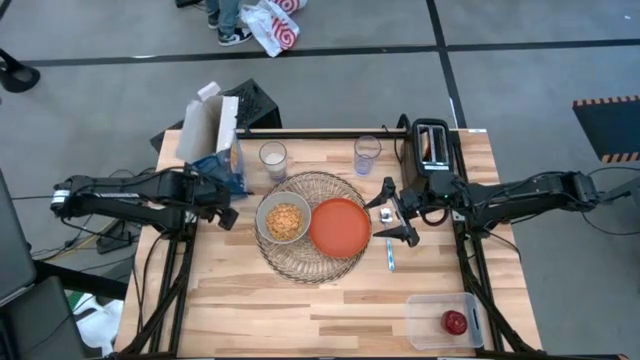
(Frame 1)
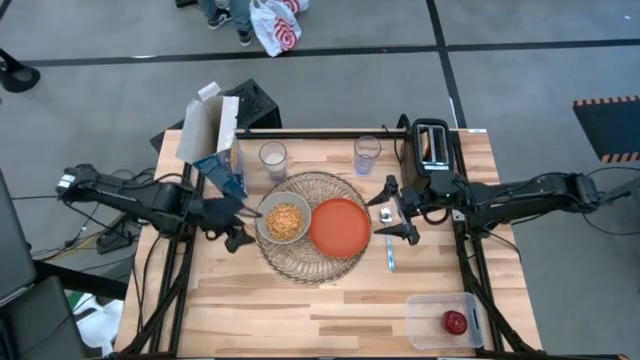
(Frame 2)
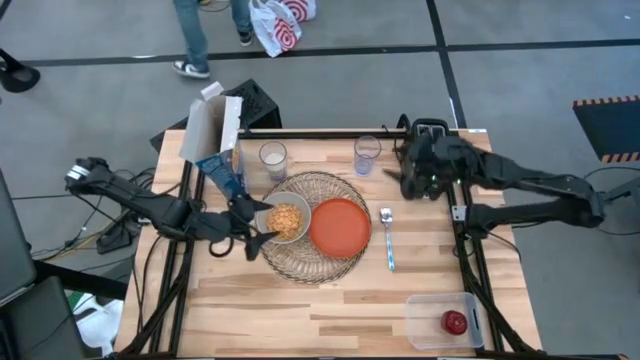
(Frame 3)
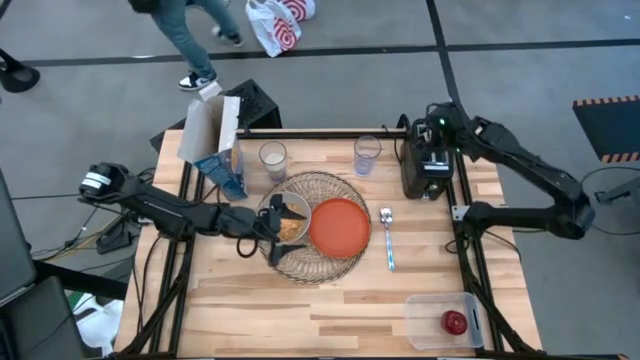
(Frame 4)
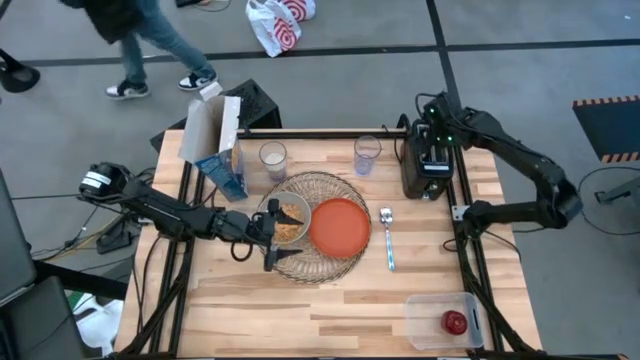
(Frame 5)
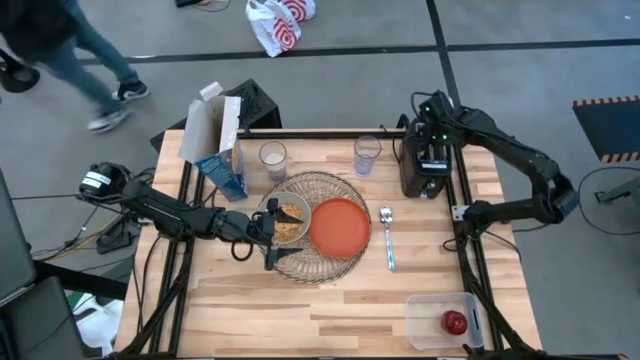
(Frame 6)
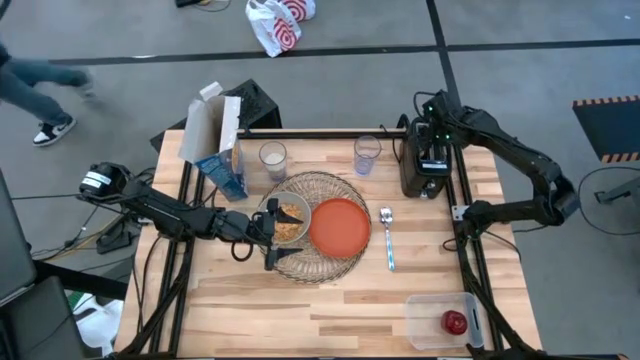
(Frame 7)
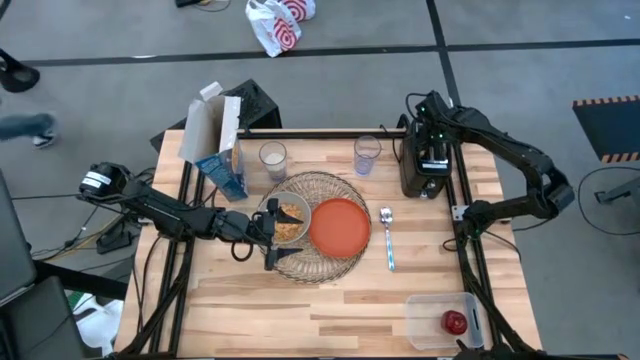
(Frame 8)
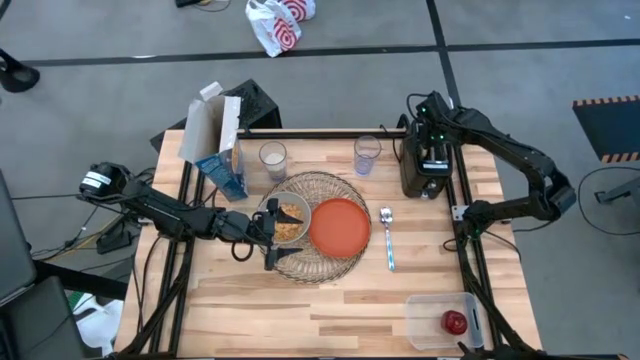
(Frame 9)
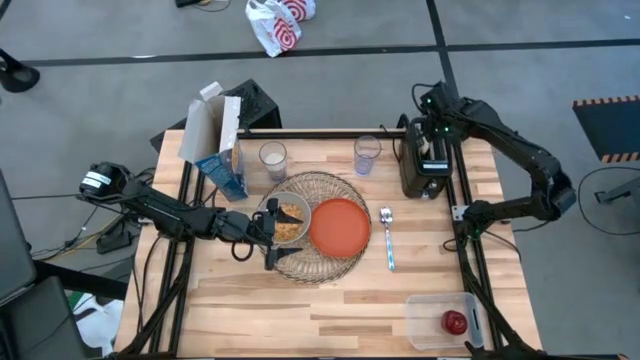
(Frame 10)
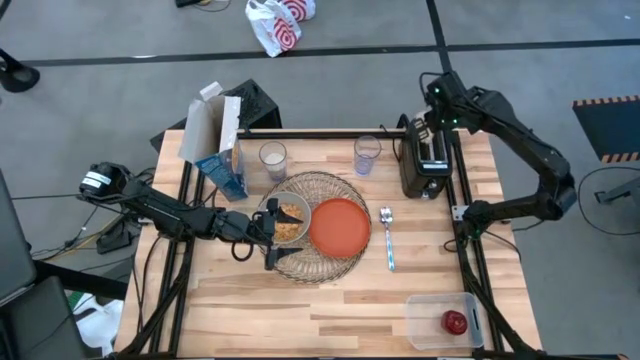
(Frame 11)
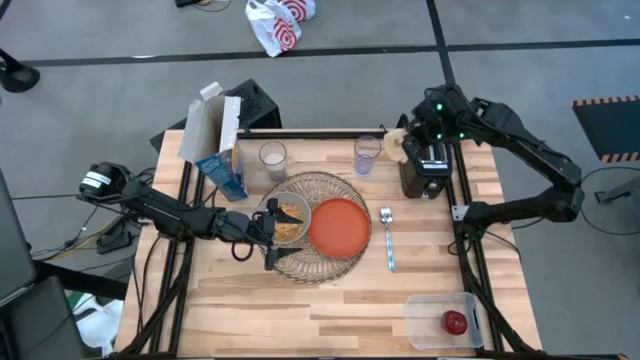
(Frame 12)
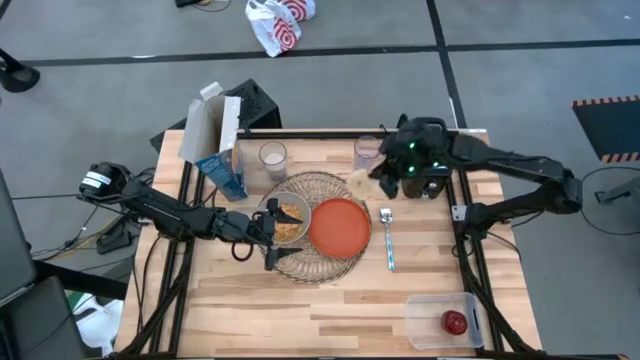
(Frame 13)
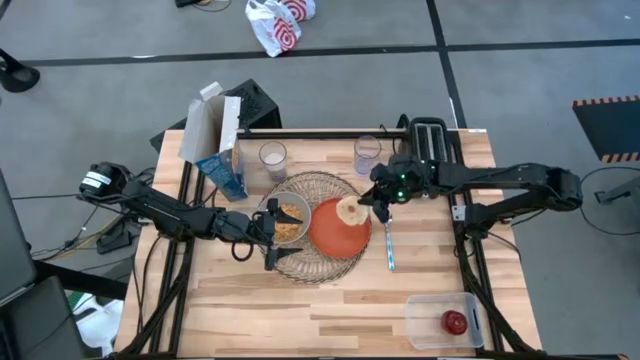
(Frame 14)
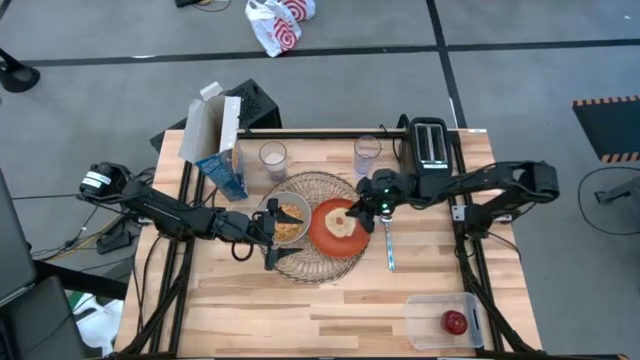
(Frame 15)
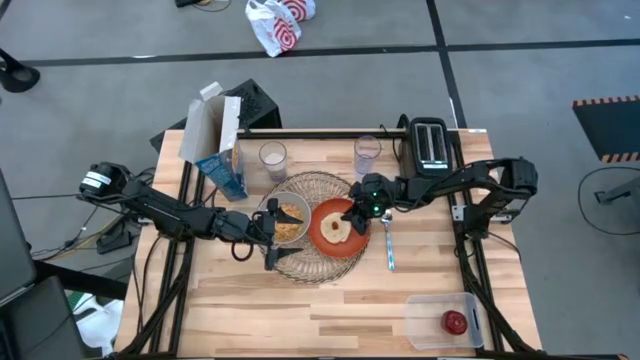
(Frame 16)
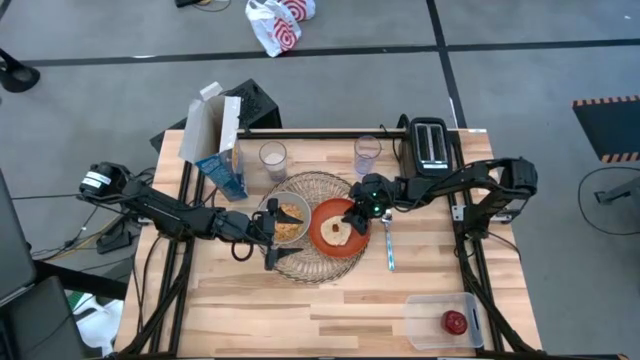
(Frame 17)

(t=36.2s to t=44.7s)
Task: Arrange a breakfast setting
Put the bagel on the orange plate

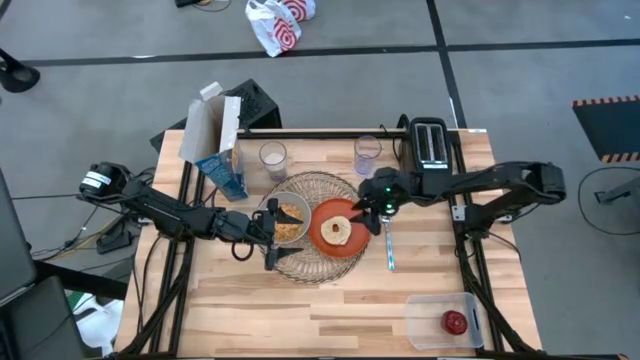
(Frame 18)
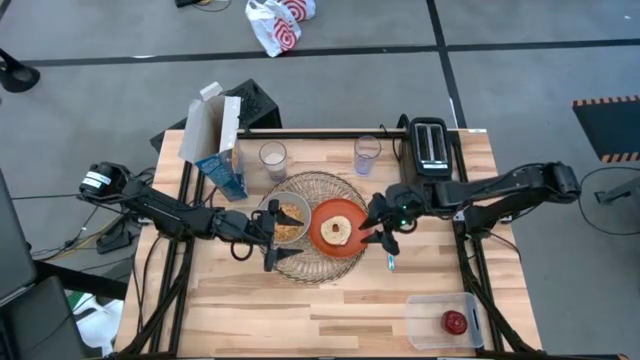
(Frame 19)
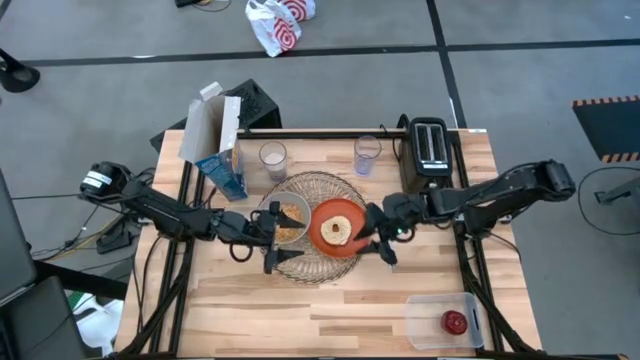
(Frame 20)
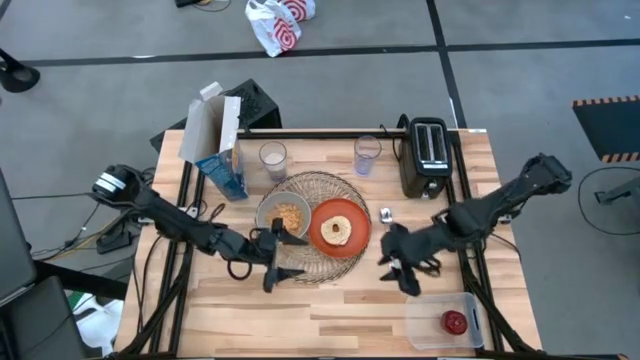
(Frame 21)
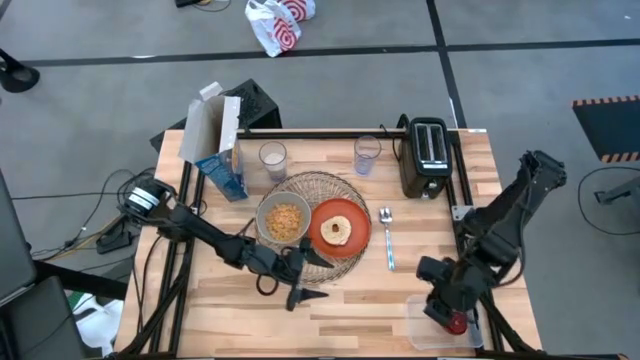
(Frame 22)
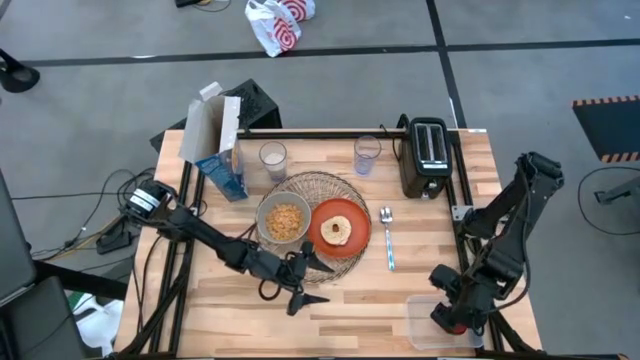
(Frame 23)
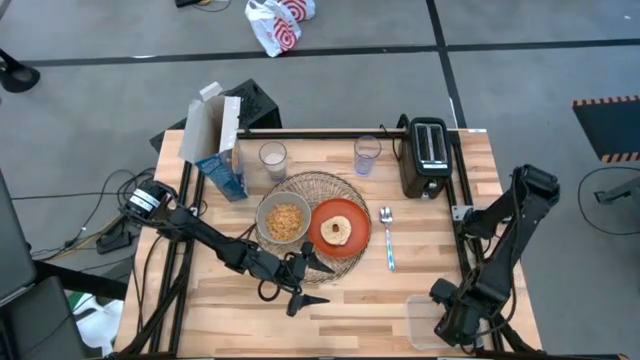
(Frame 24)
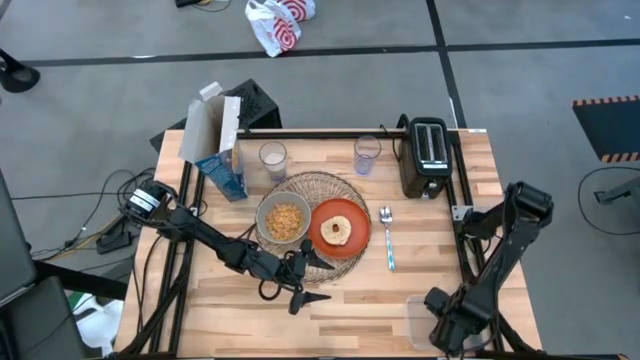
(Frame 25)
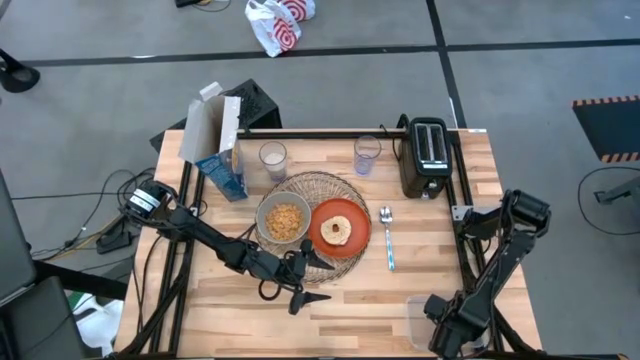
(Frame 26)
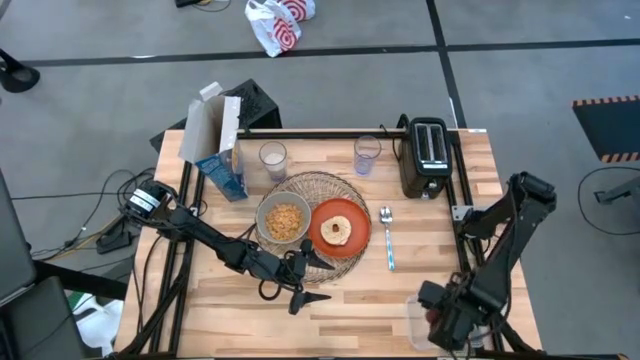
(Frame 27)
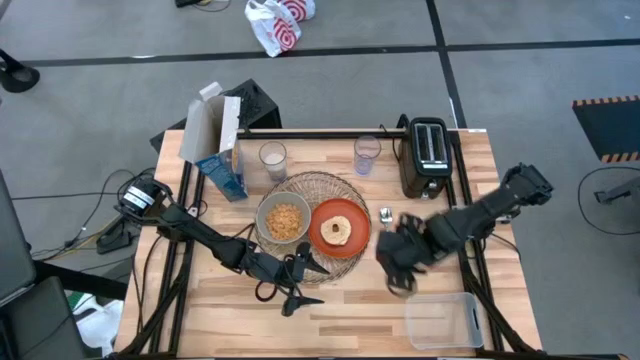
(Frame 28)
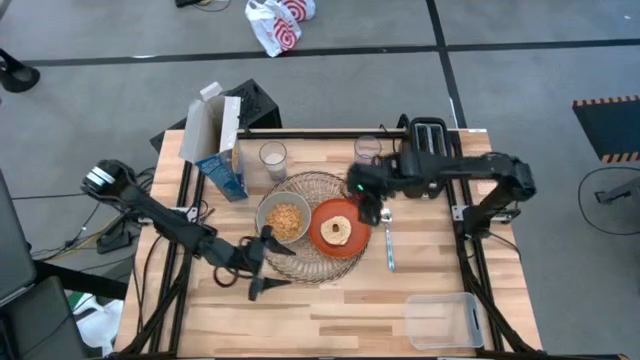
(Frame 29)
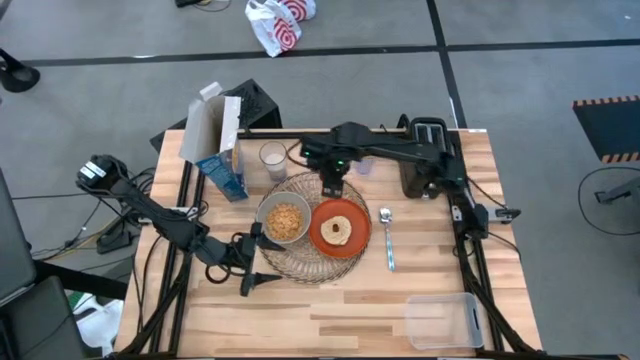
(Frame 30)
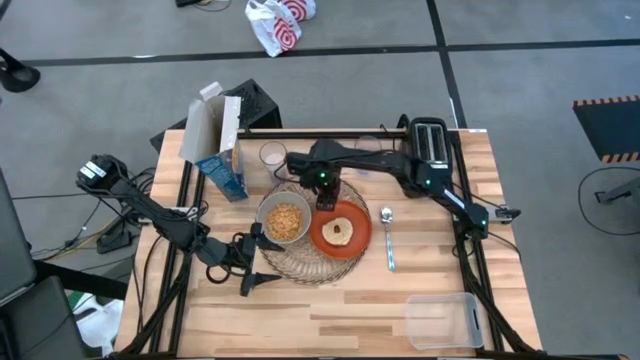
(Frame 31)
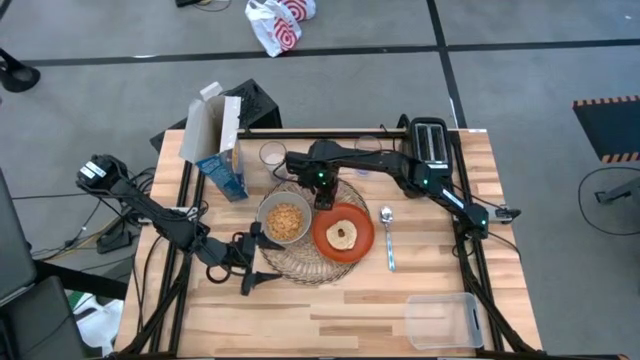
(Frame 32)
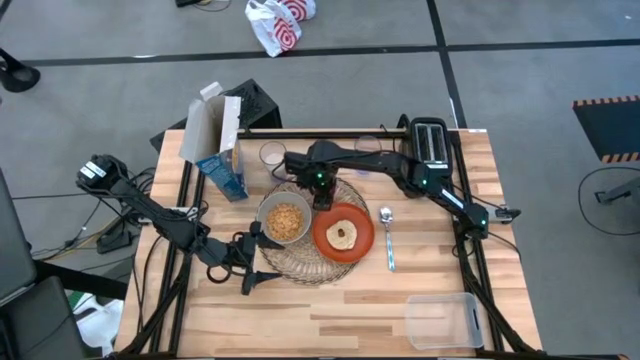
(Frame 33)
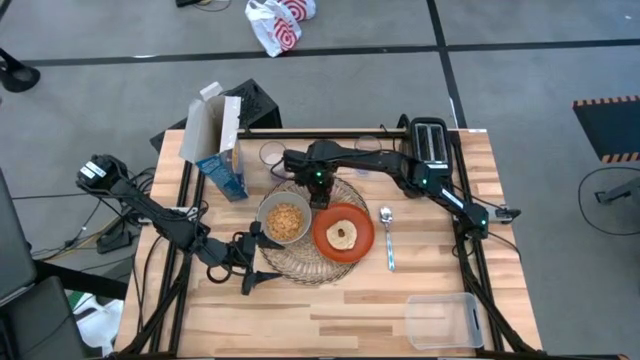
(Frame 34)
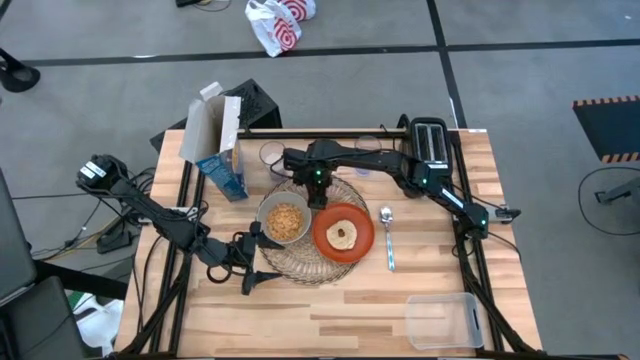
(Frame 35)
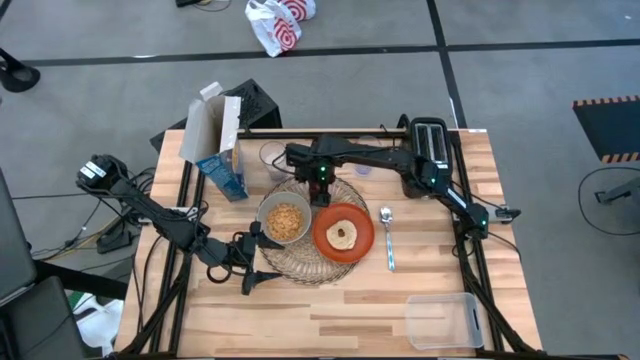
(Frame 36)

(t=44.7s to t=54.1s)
Put the red apple on the top of the brown table mat

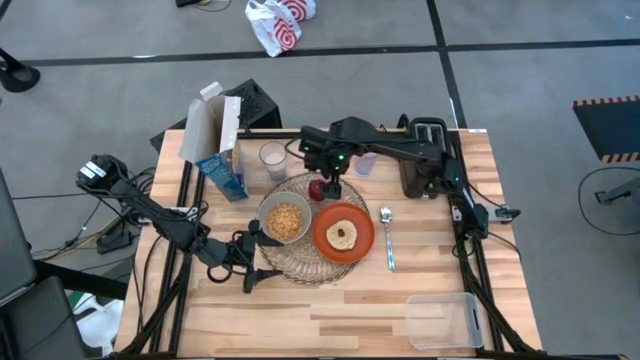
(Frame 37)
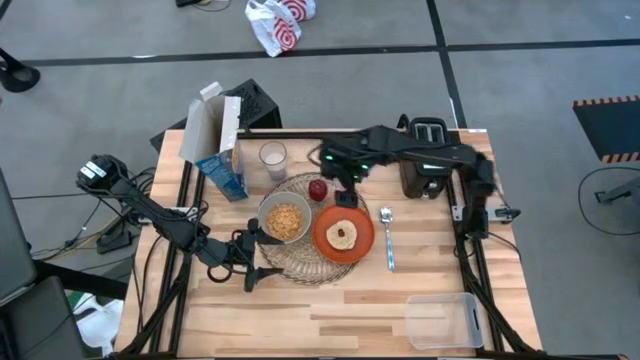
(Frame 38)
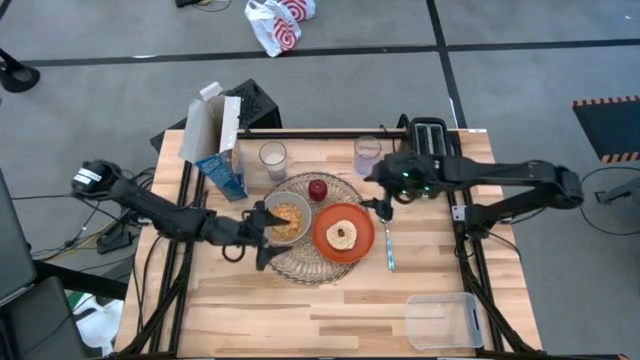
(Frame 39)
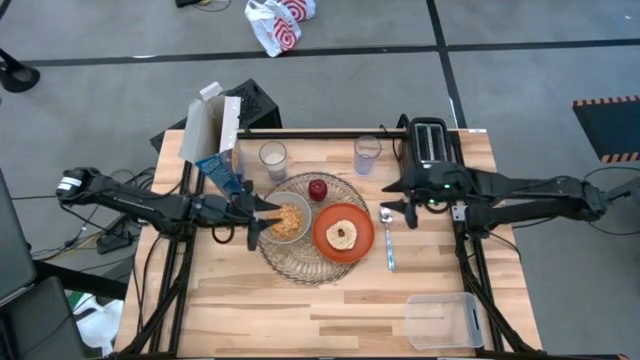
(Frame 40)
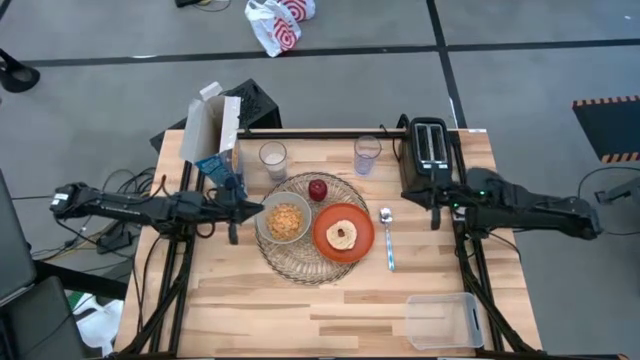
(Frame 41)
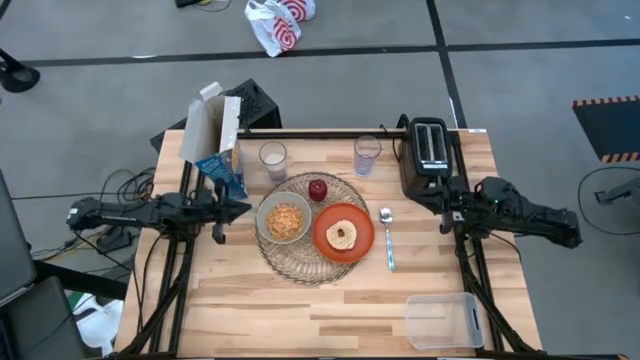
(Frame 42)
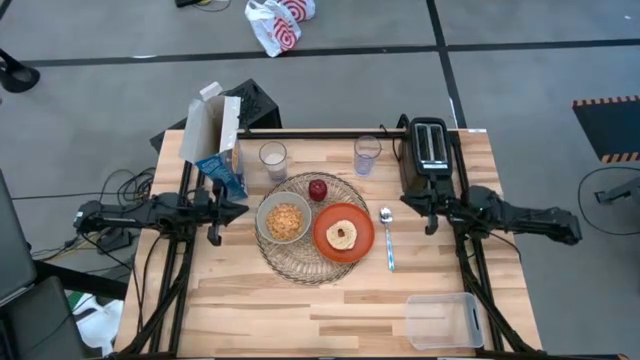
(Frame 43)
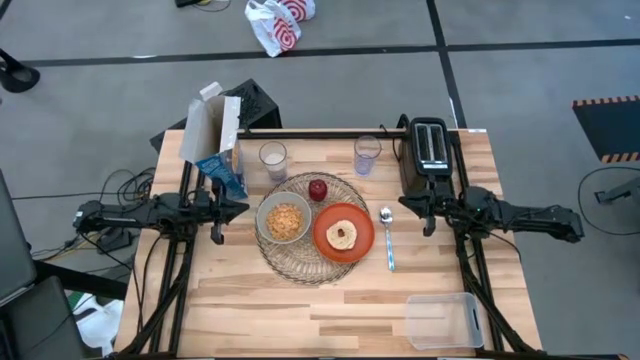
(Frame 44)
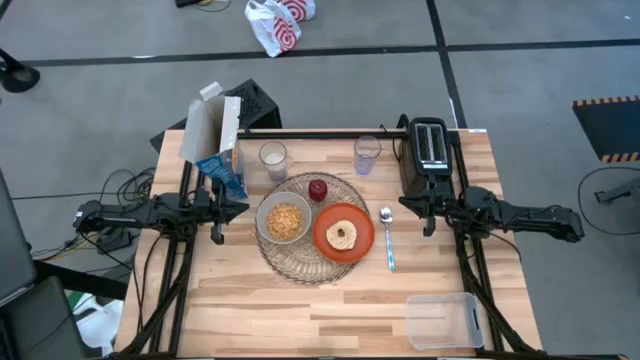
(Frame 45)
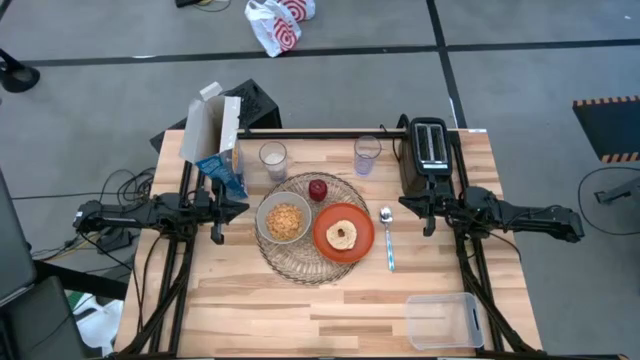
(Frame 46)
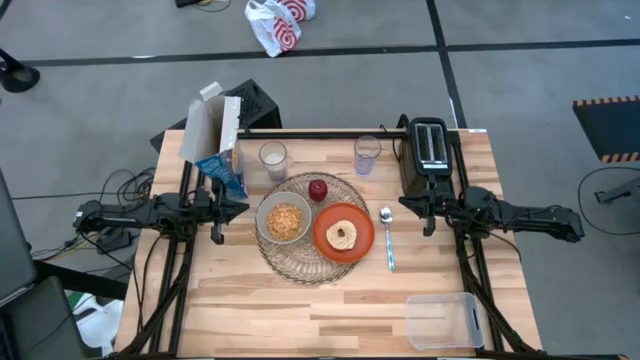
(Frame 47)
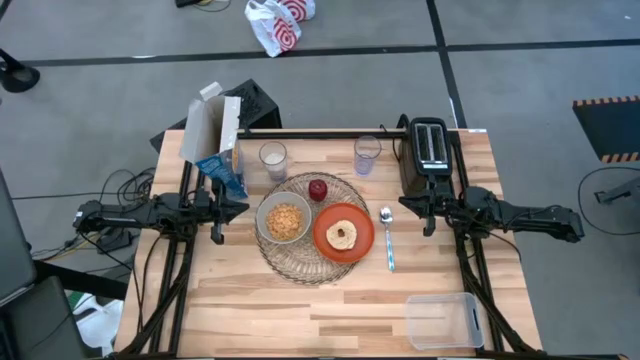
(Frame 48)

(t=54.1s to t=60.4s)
Return to Home Position
